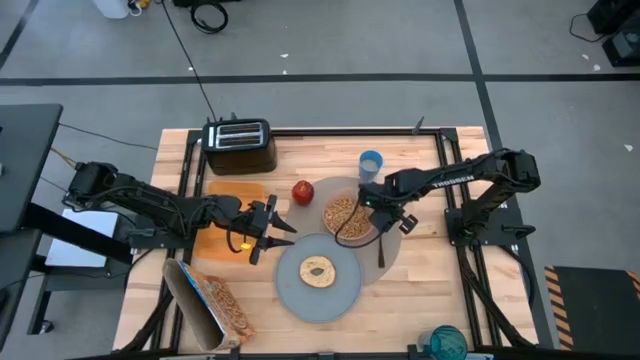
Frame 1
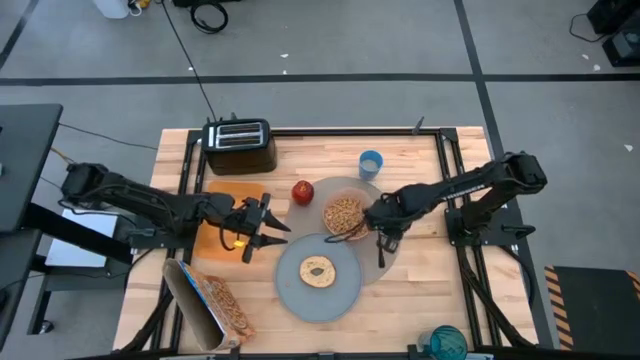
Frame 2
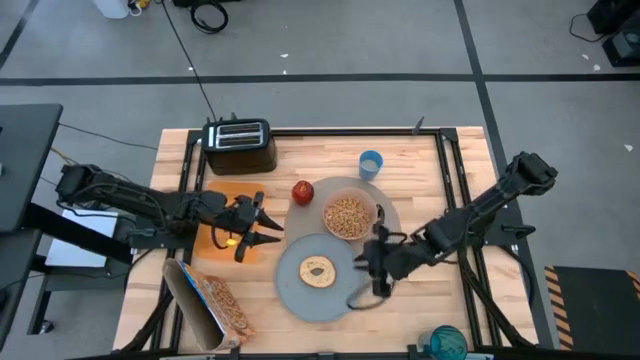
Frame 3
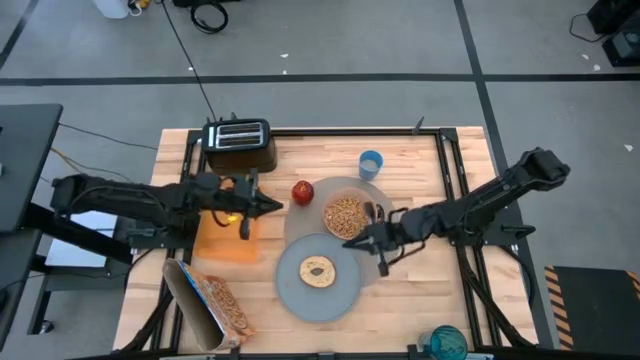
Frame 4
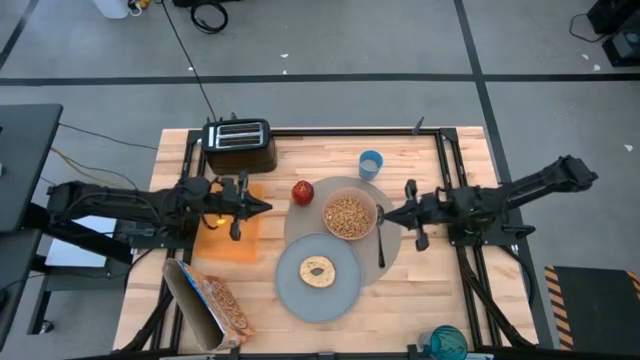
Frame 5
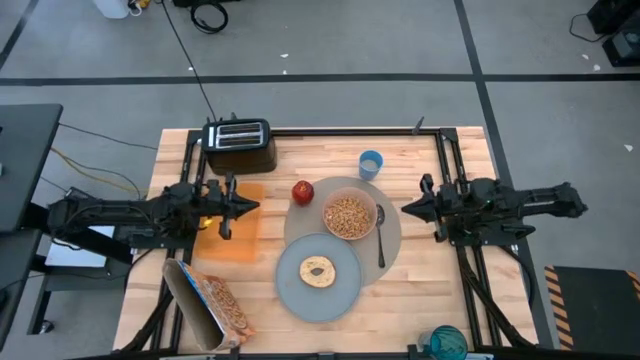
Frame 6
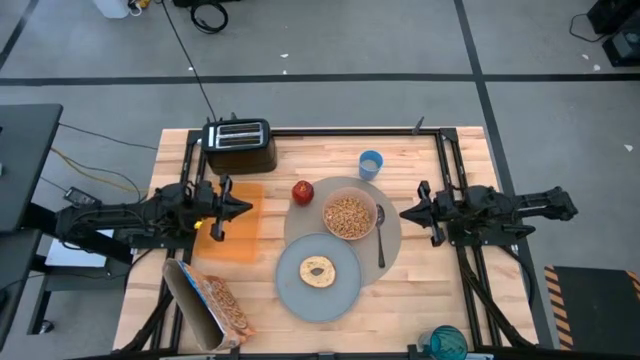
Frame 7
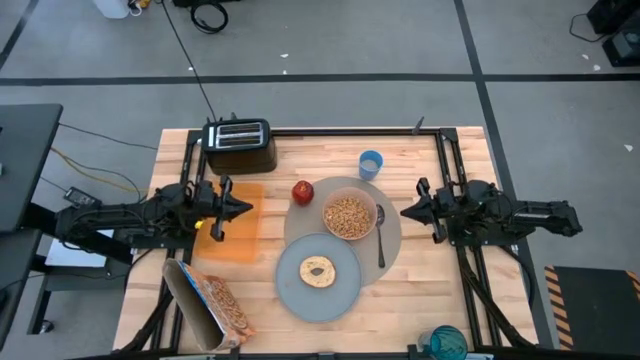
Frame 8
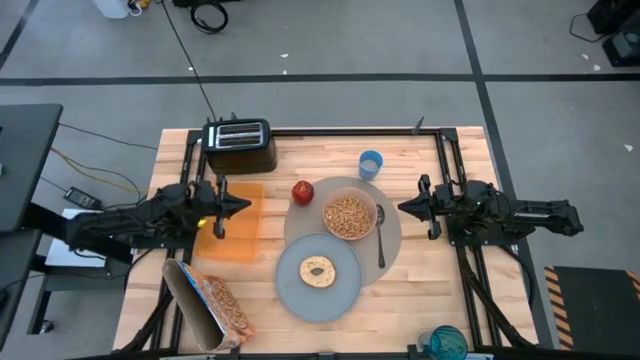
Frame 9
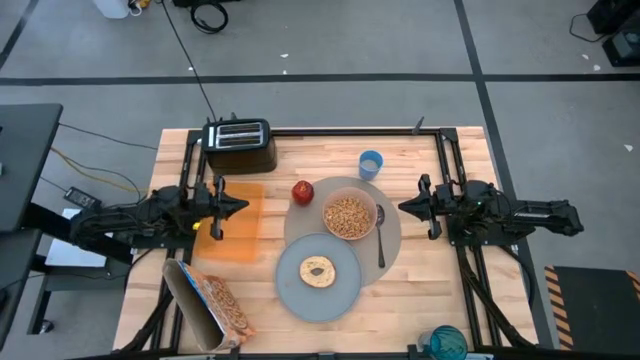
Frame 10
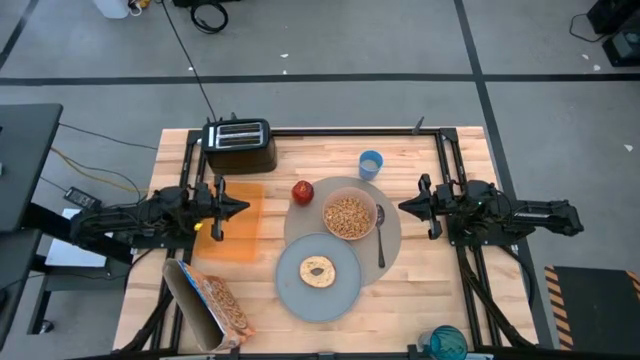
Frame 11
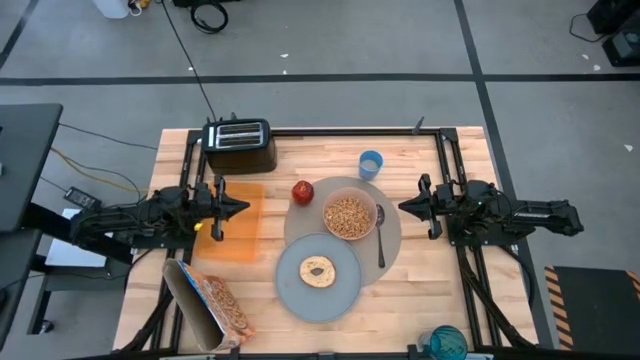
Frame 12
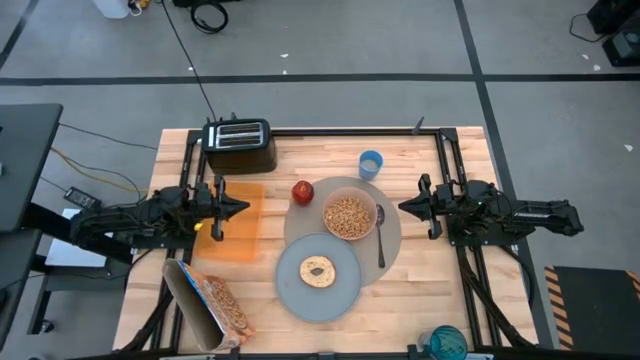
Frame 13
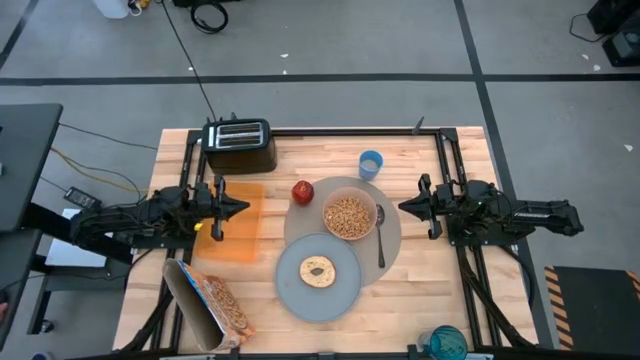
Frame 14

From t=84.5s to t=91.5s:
Task: Arrange a breakfast setting
Return To Home Position

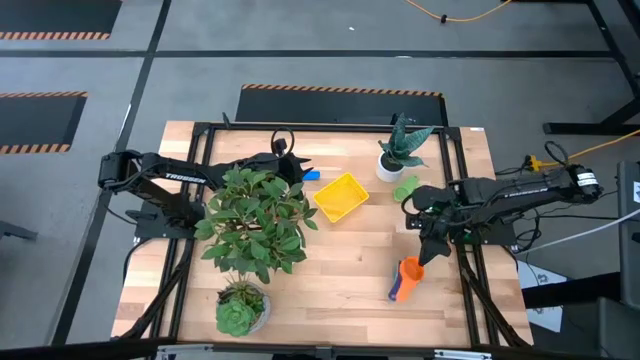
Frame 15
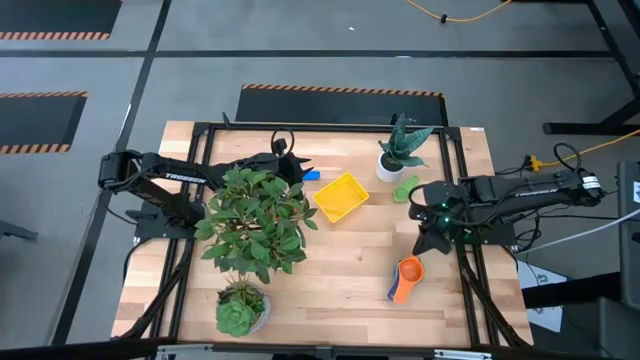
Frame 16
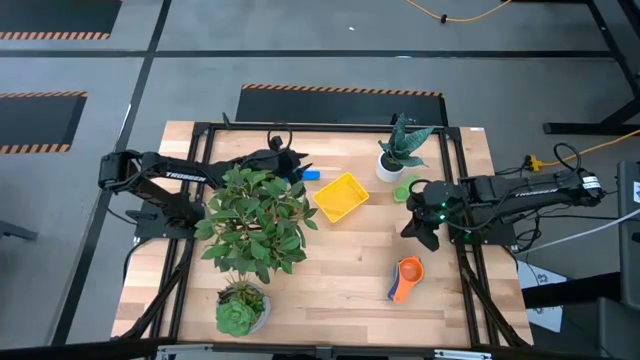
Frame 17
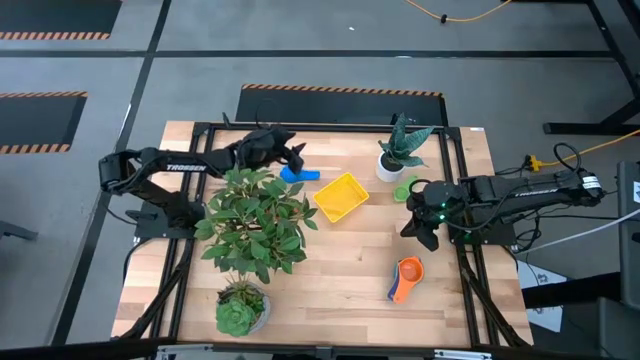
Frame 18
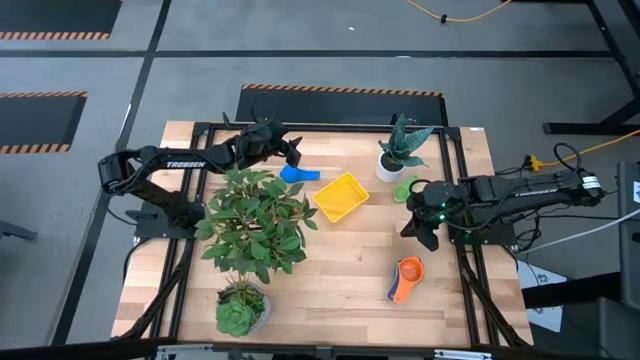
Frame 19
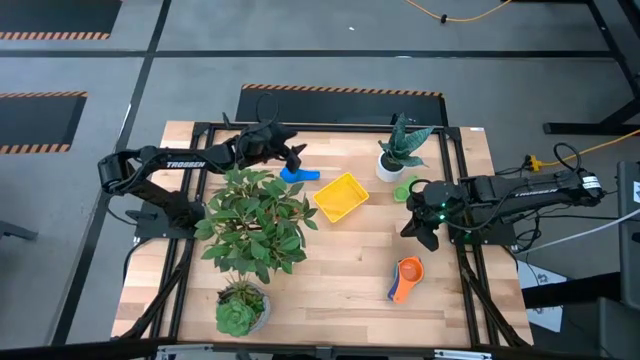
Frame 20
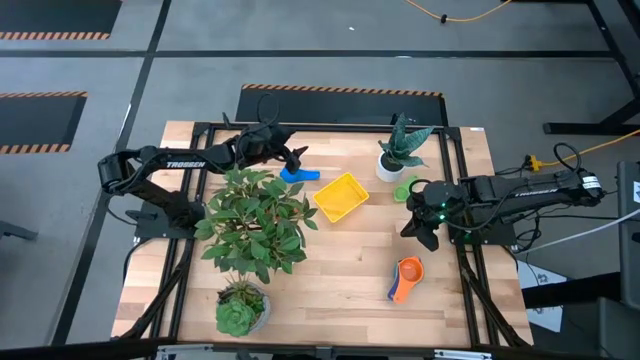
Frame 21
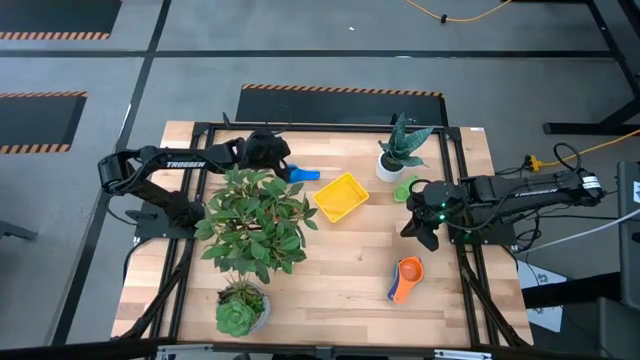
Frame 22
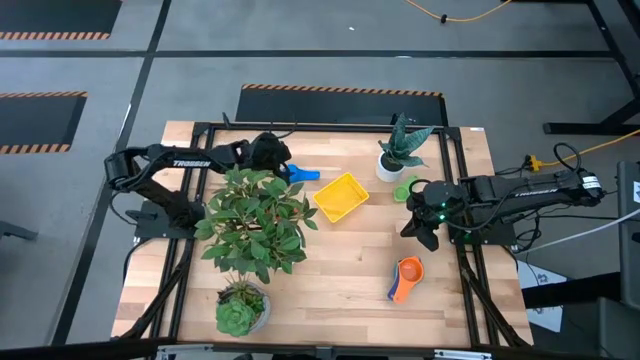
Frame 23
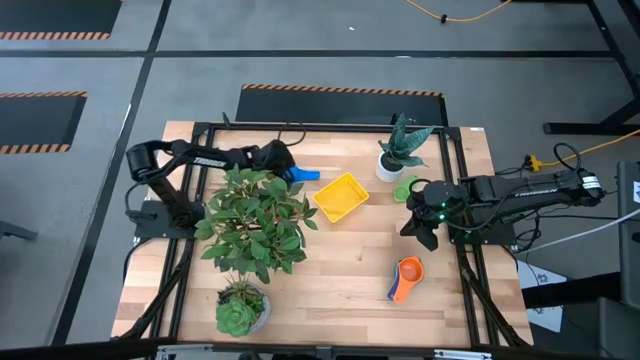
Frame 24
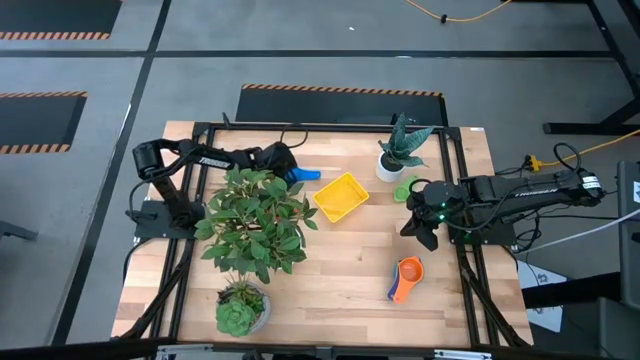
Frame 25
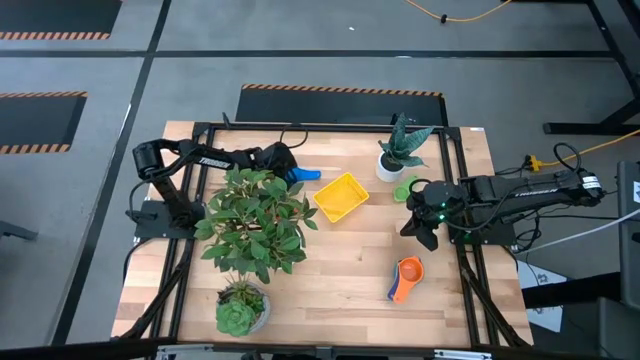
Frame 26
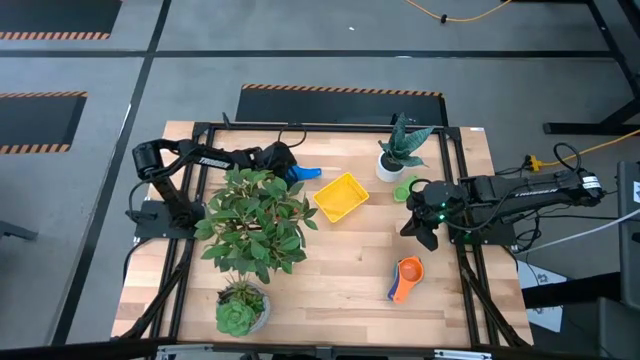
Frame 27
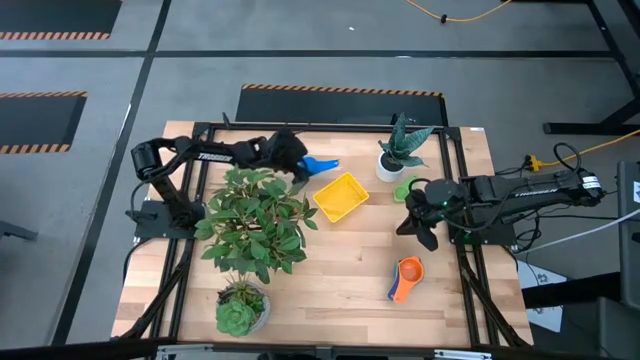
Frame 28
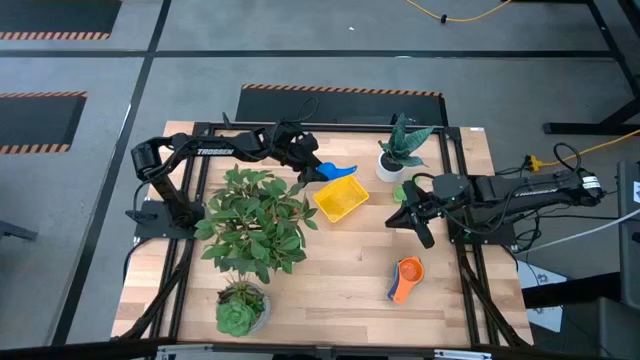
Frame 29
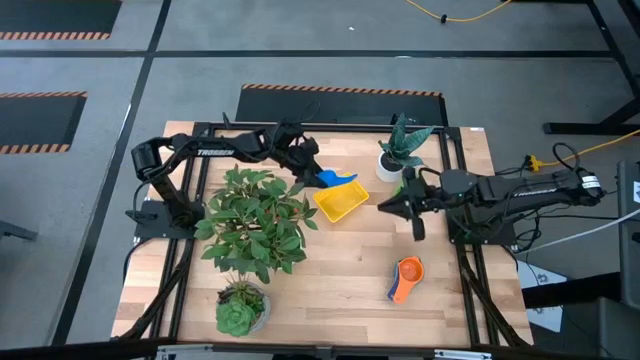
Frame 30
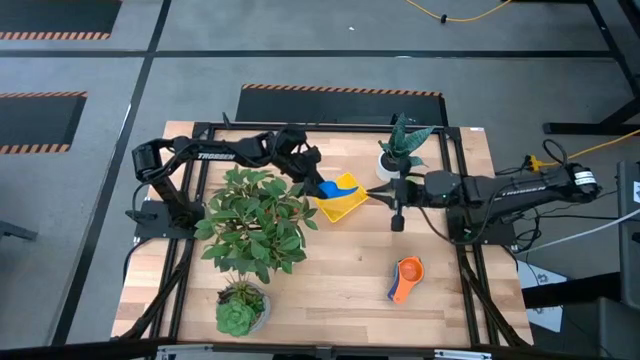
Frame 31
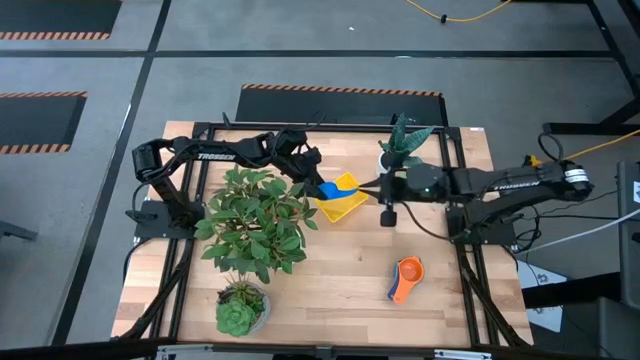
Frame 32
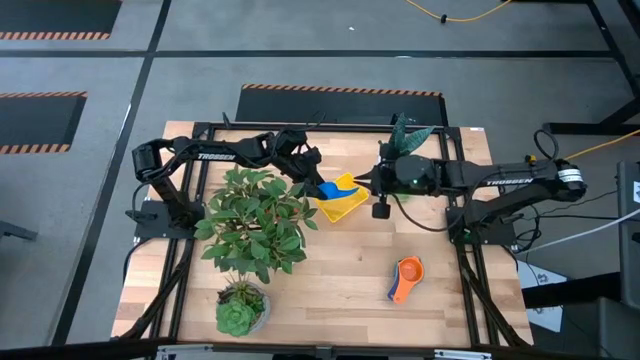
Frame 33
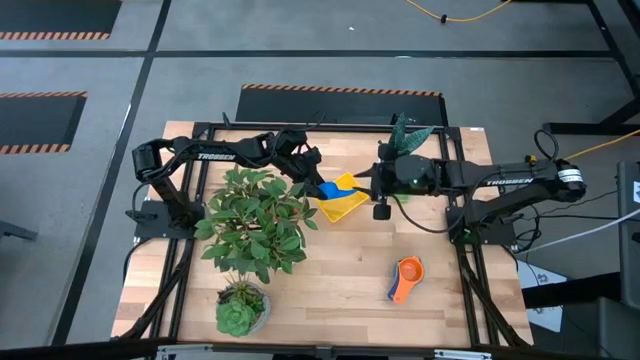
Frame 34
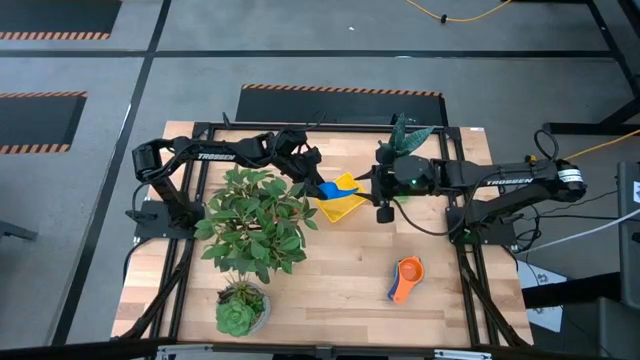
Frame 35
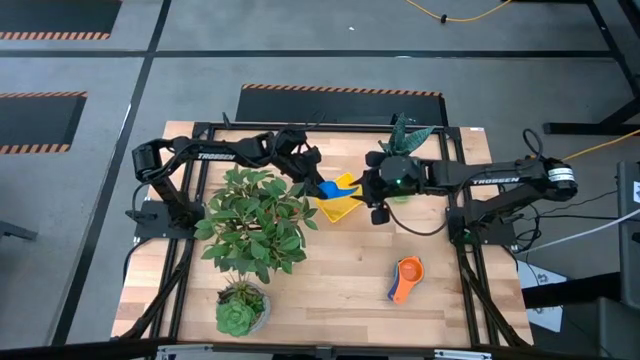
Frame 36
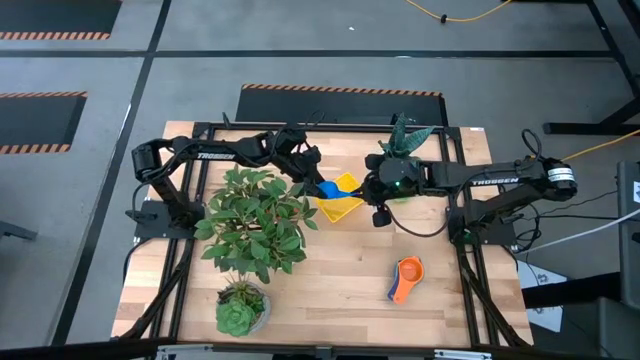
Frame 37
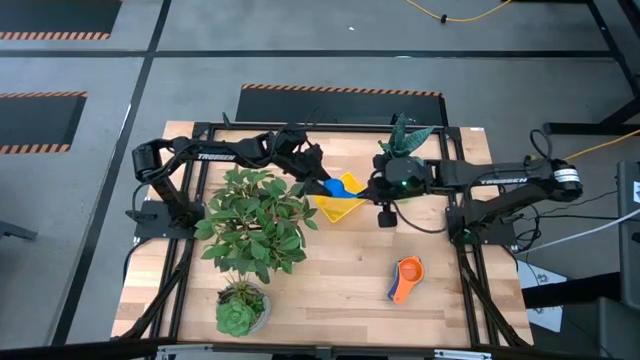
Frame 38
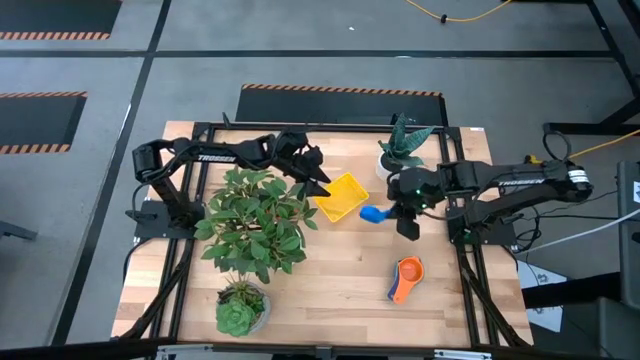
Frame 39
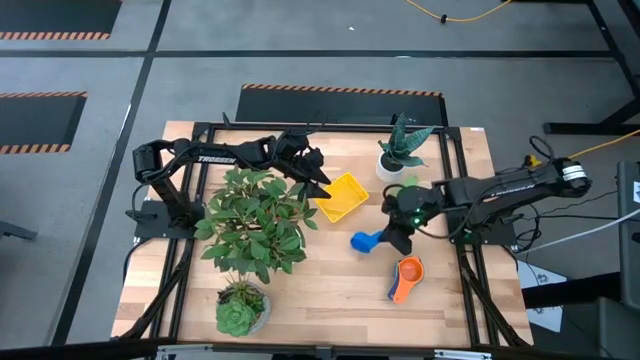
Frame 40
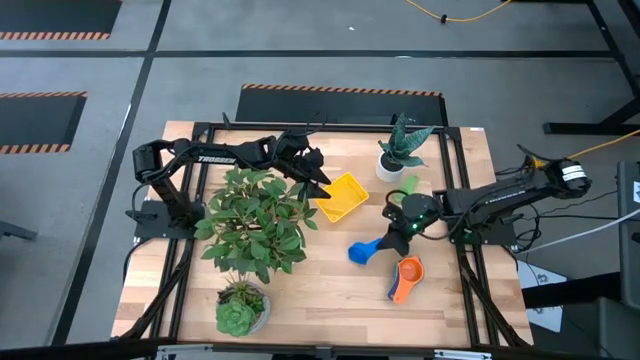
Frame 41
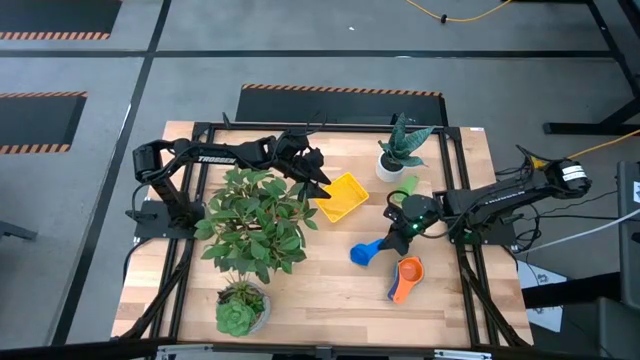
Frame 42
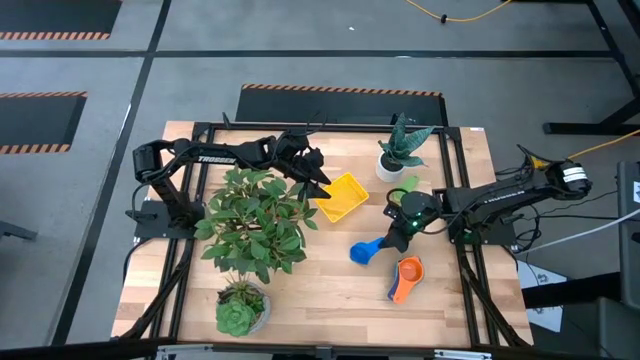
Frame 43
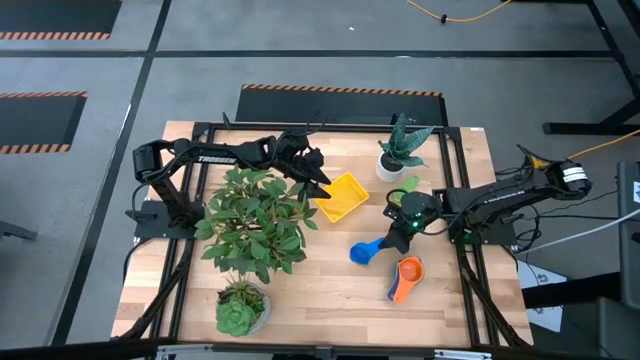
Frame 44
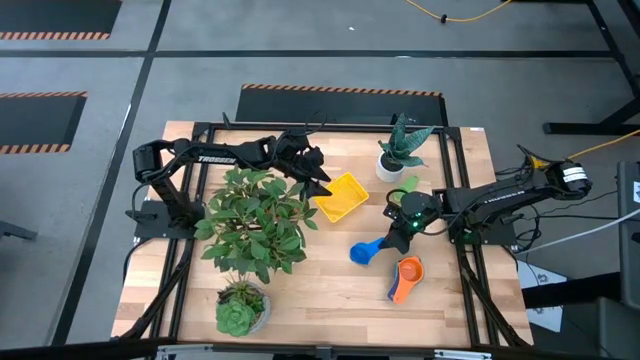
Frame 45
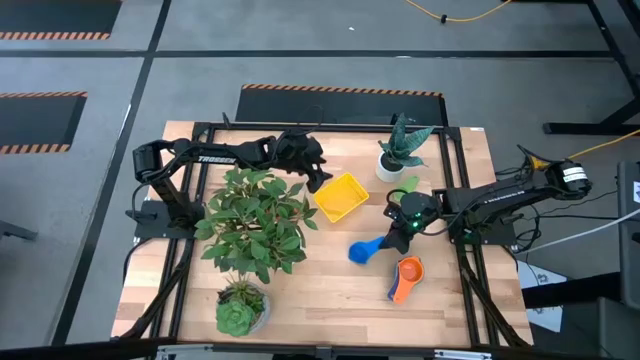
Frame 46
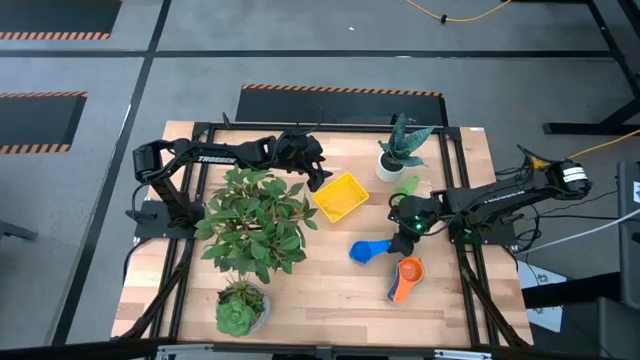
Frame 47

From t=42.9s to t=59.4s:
Task: Nest measuring cups in basket
Move the blue measuring cup to the center of the table
